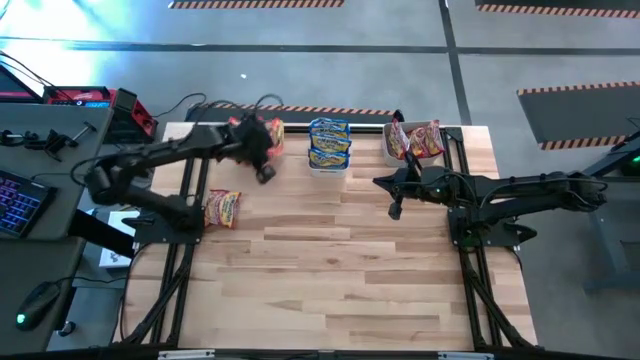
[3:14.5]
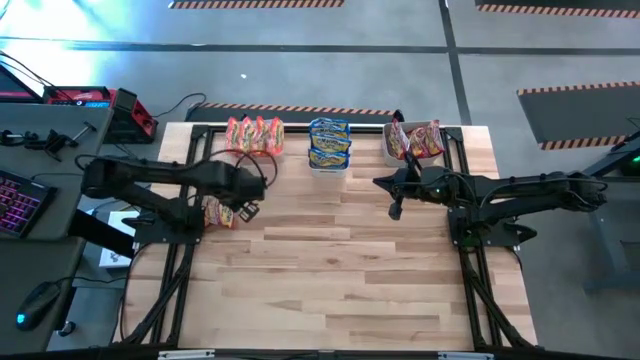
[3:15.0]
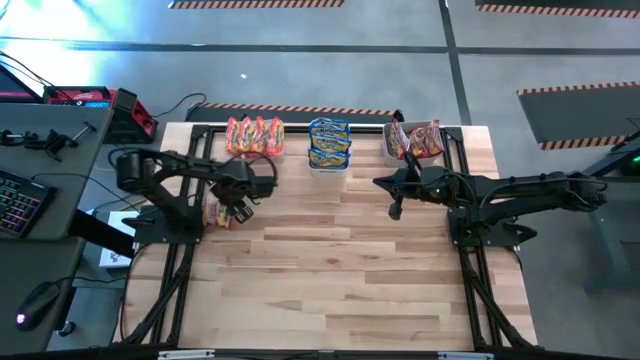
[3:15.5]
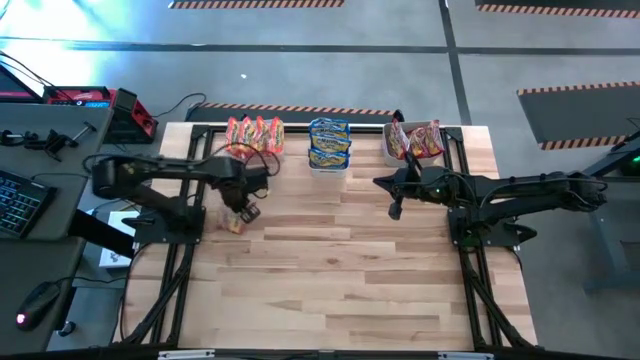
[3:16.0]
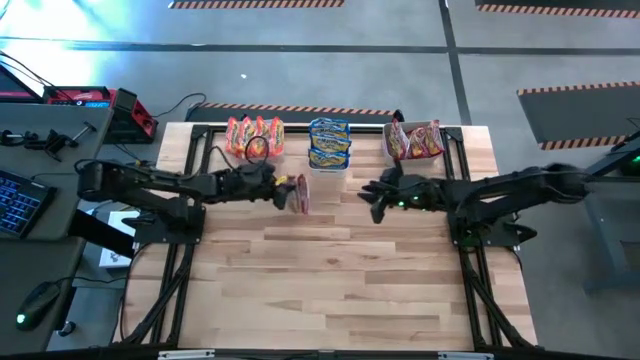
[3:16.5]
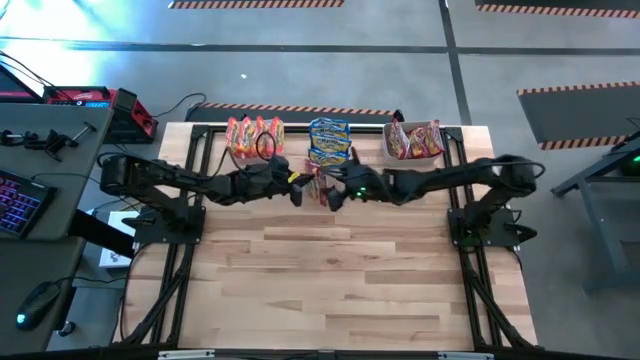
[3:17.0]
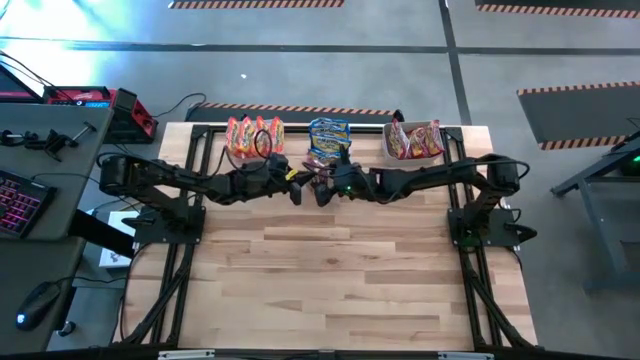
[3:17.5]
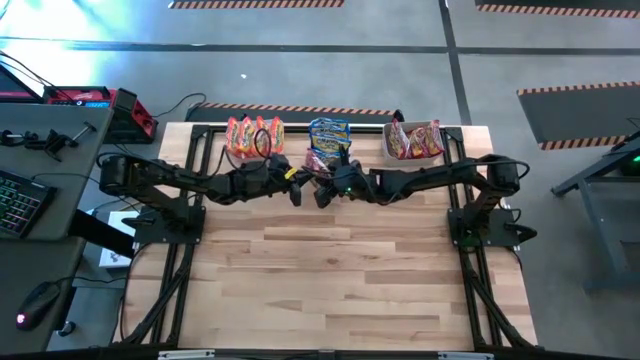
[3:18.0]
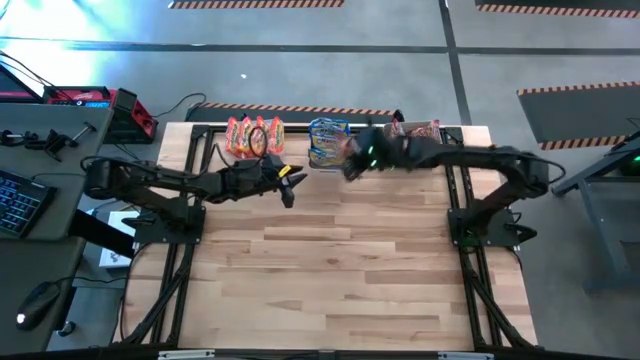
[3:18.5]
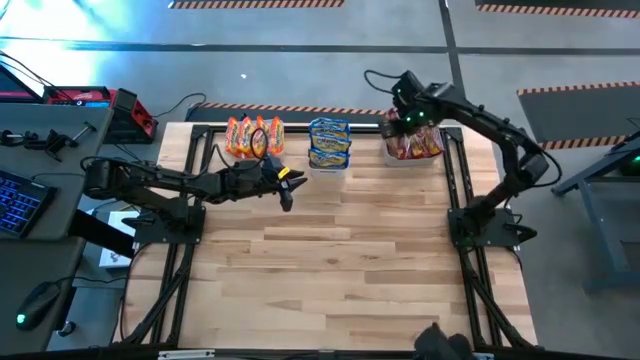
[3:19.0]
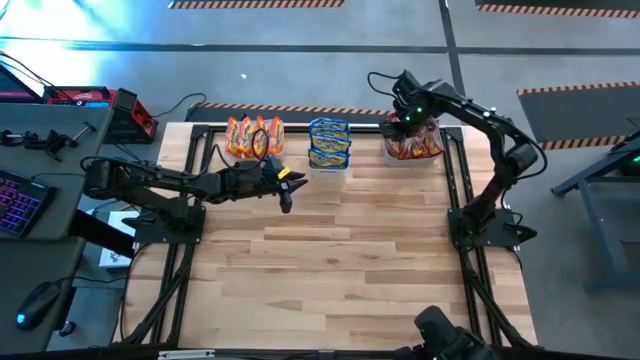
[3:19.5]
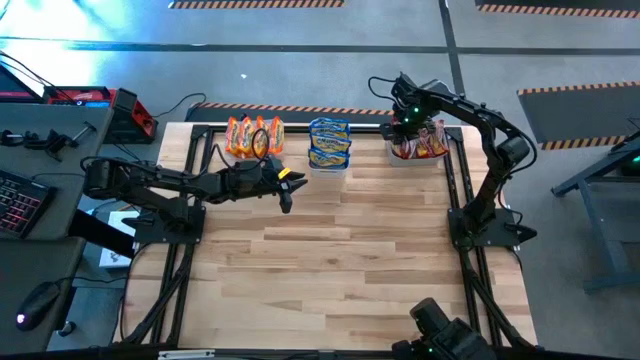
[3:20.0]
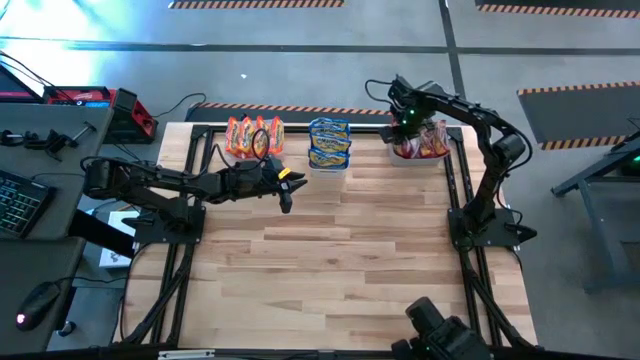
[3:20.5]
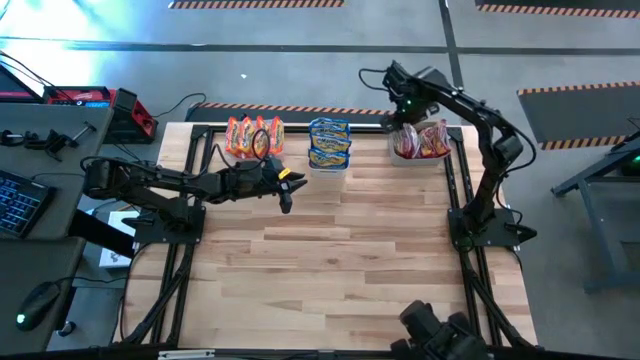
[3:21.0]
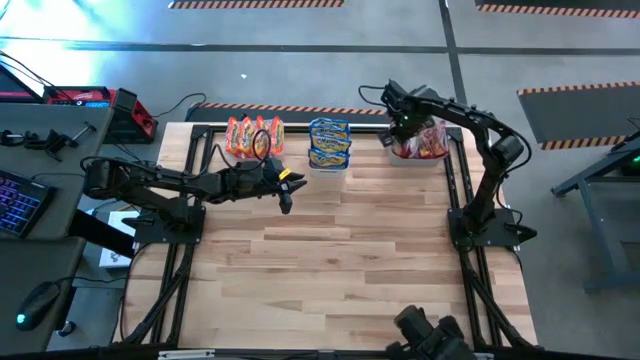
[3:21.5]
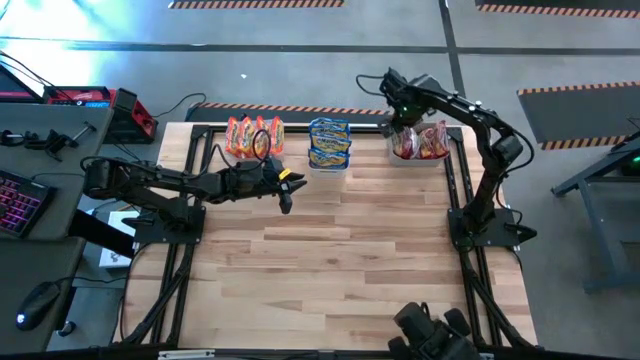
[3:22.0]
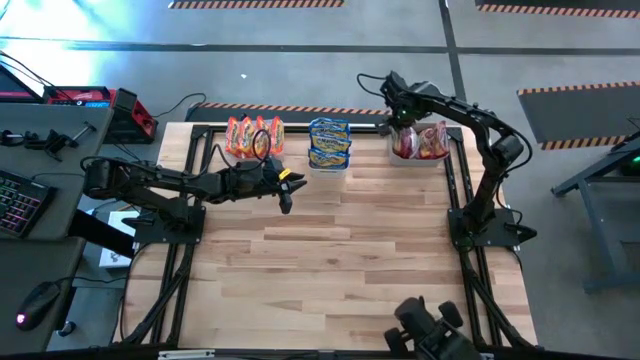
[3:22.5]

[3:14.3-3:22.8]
Task: Sort Maruchan noodles
Put the red noodle pack into the gray bin

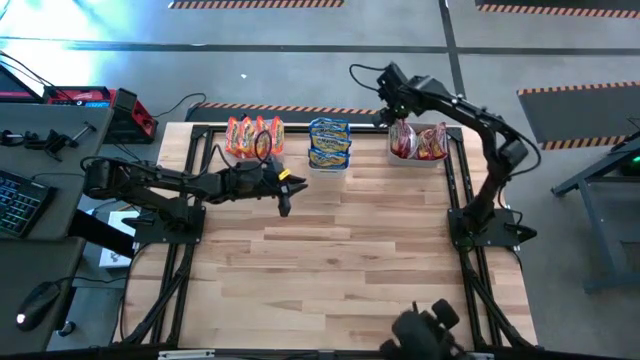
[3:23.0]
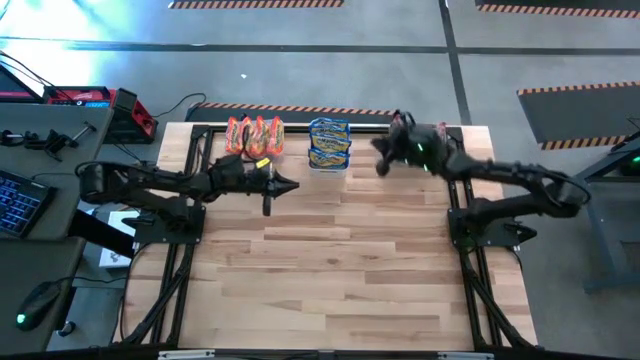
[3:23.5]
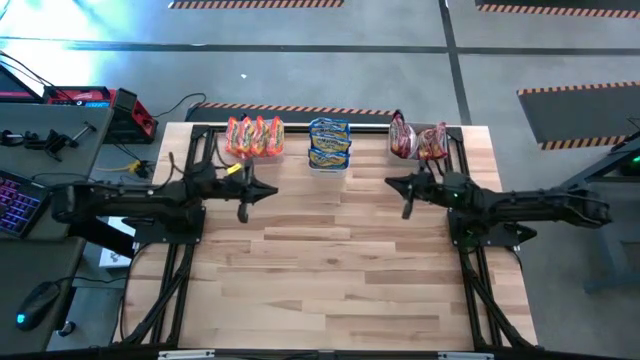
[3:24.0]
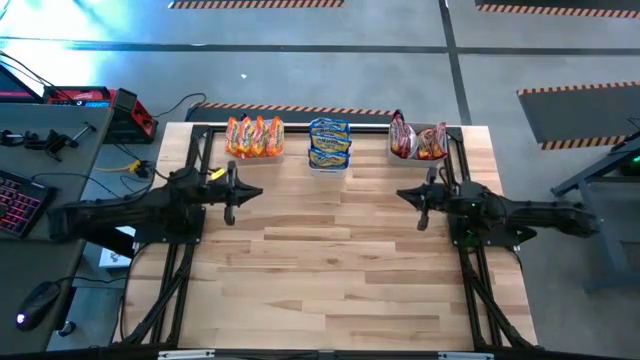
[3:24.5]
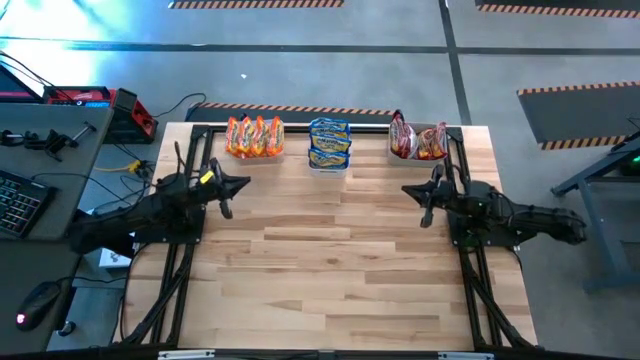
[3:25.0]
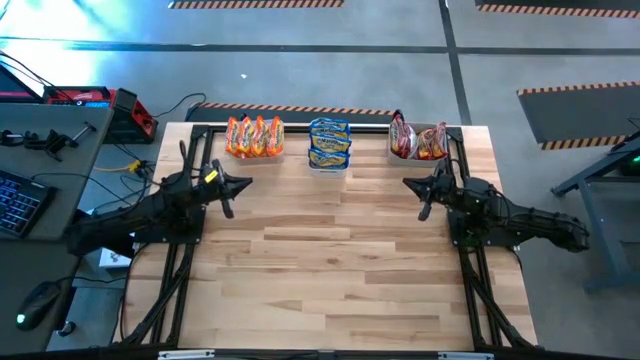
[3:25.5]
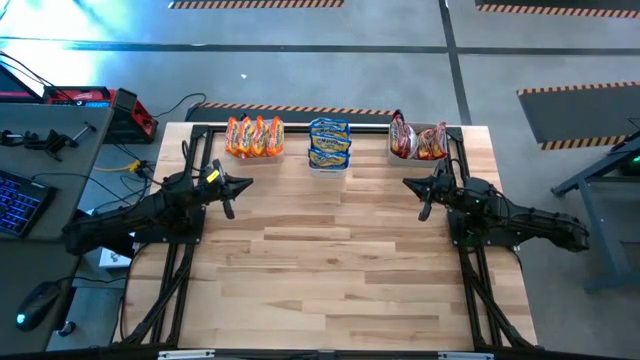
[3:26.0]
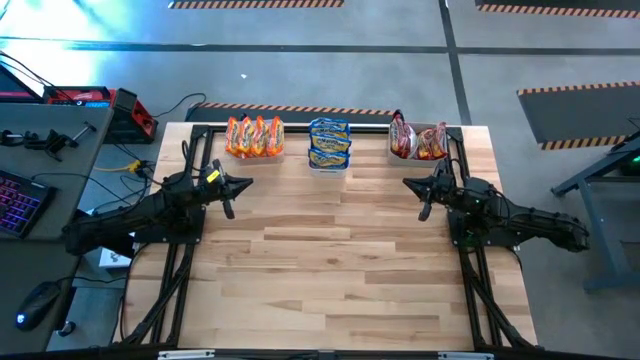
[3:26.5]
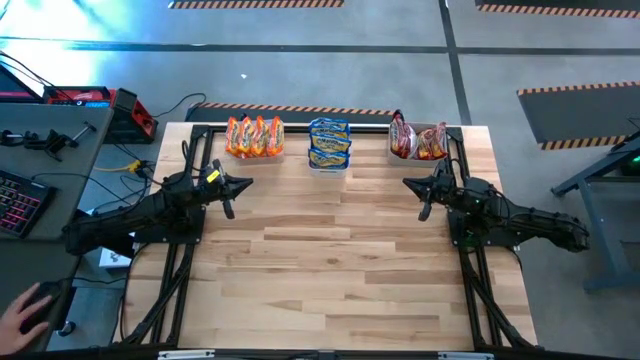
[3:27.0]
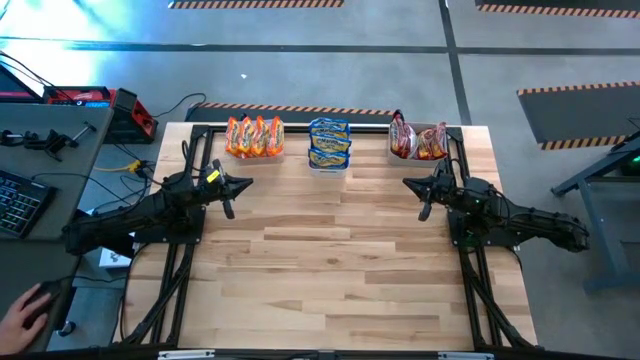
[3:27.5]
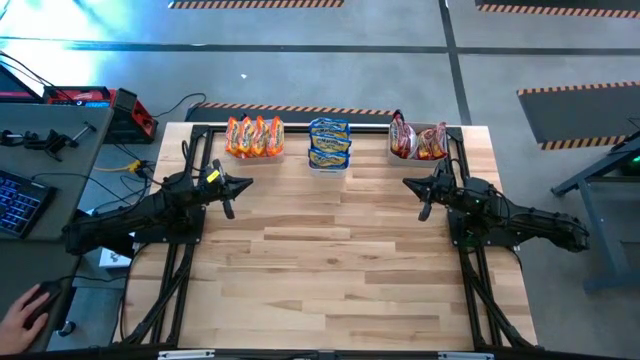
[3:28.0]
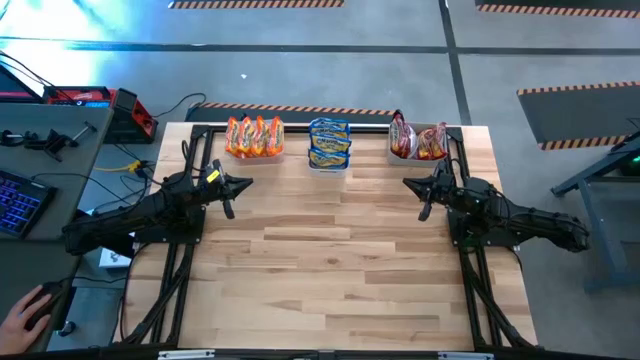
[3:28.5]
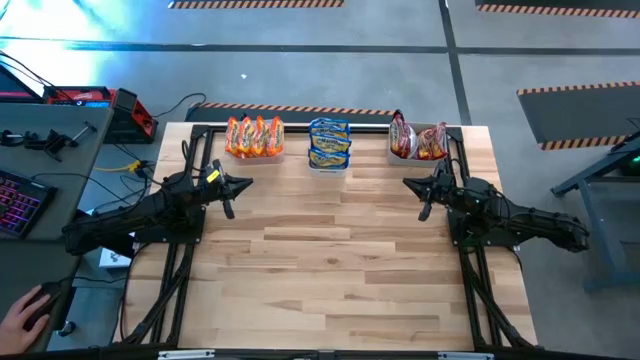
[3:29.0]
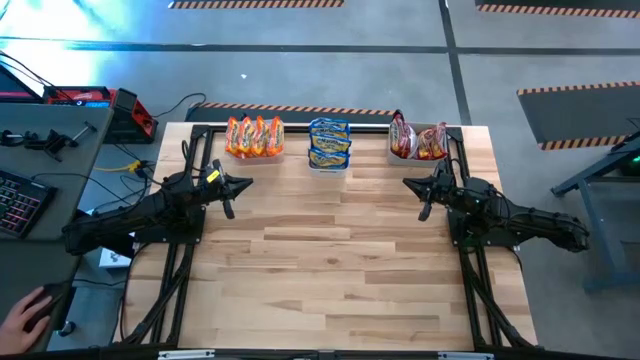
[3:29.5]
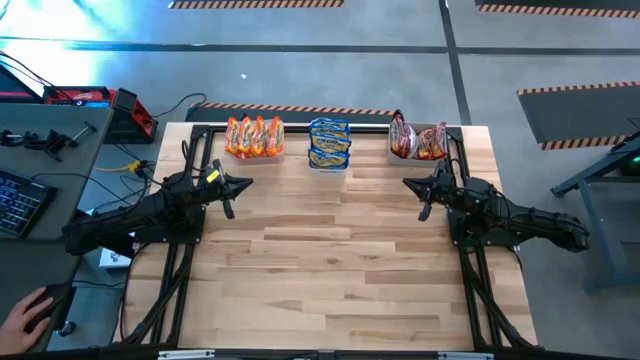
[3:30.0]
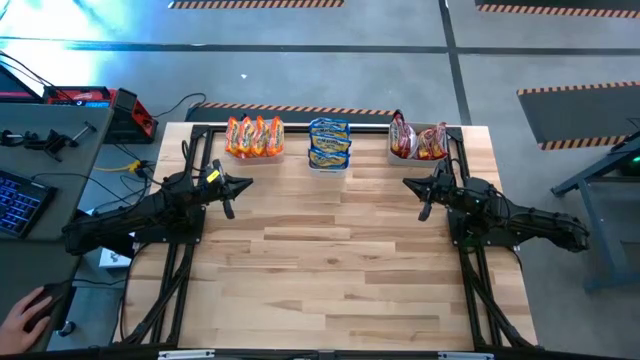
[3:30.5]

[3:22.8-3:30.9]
Return to Home Position

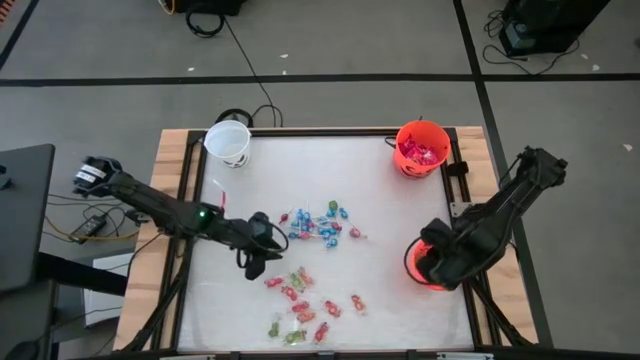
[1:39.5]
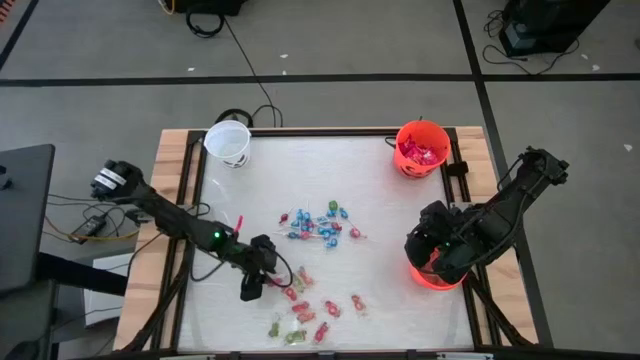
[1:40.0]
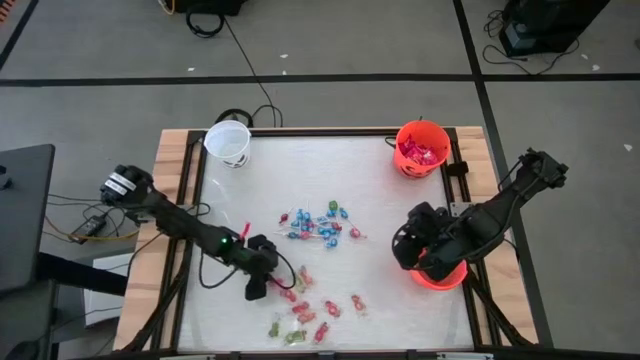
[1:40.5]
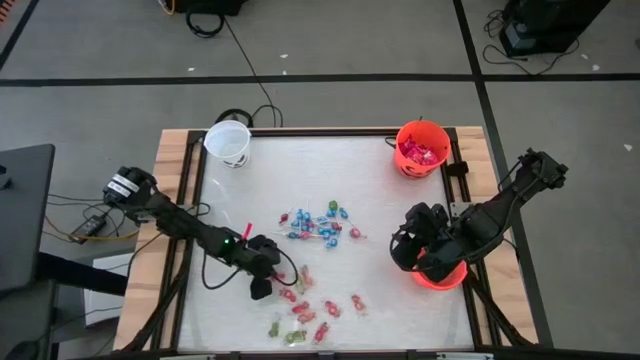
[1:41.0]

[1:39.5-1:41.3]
Task: Sort candy by brand, put in halloween buckets
Put the red gummy into the bottom orange bucket

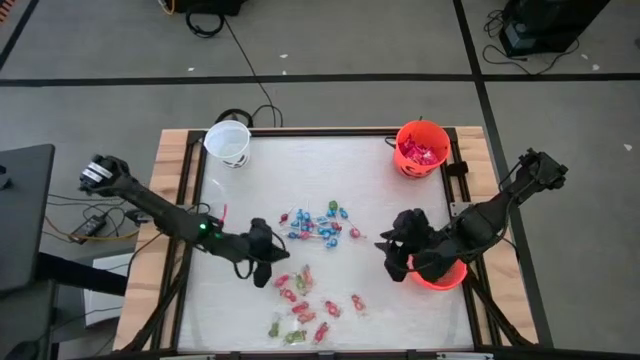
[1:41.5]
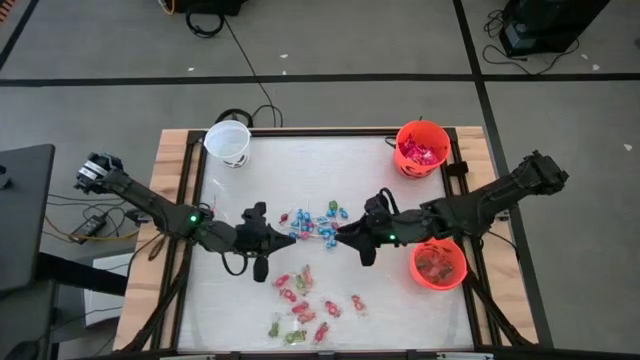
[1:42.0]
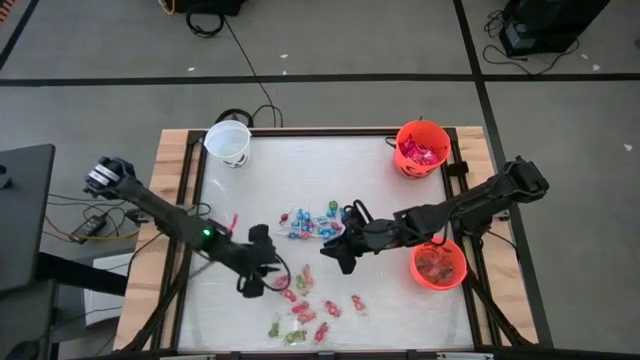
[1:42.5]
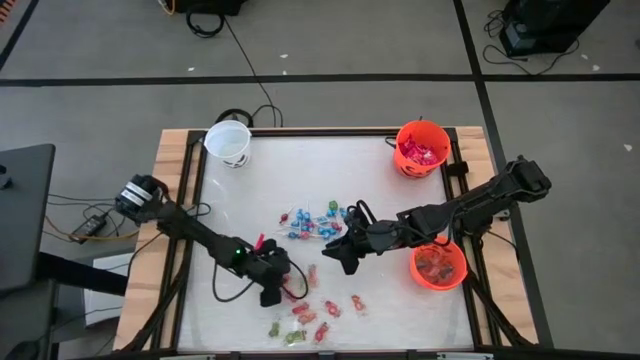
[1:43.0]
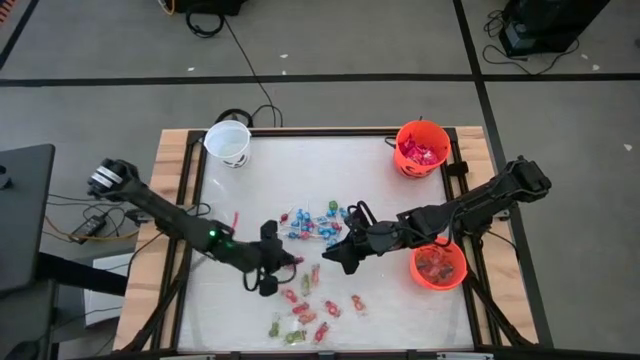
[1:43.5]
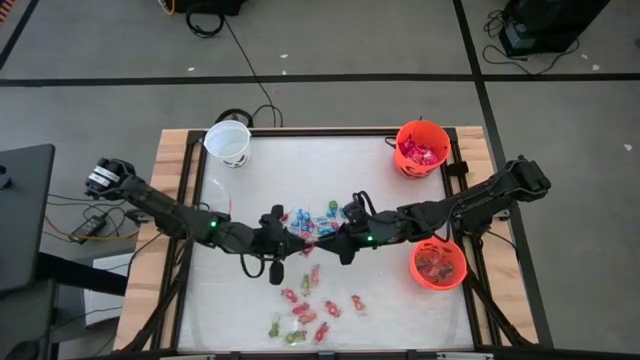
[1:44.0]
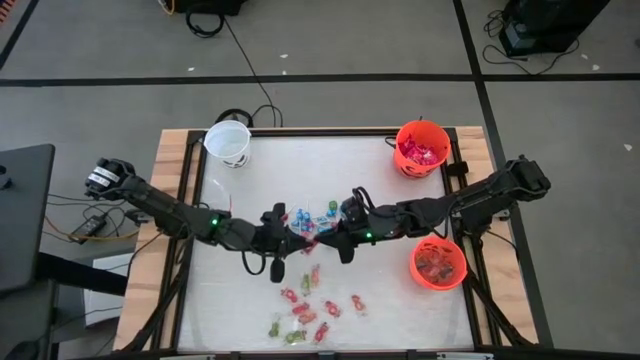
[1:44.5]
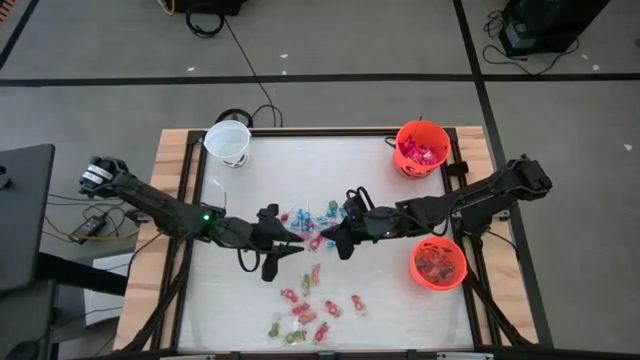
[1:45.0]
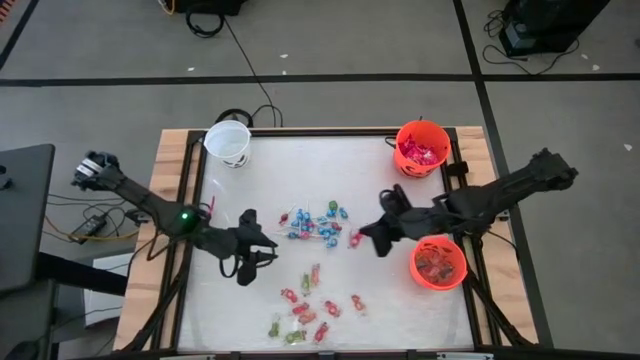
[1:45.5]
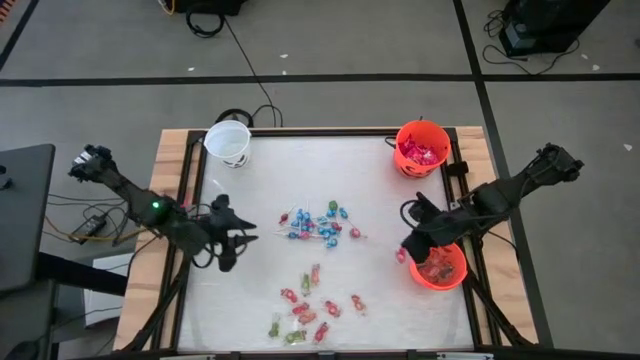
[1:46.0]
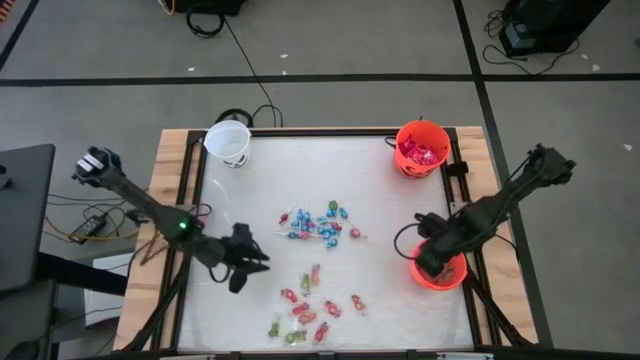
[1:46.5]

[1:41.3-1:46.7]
Put the red gummy into the bottom orange bucket
